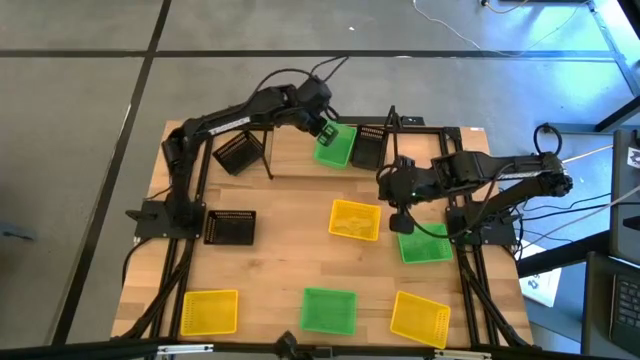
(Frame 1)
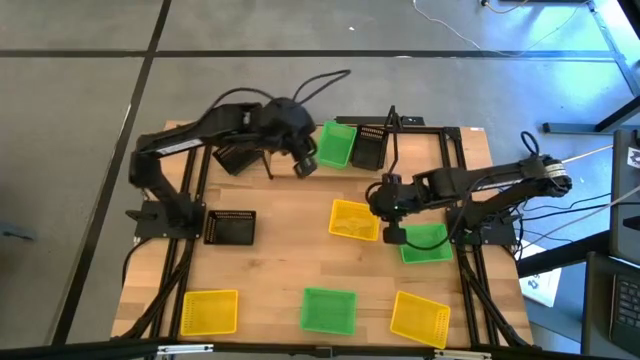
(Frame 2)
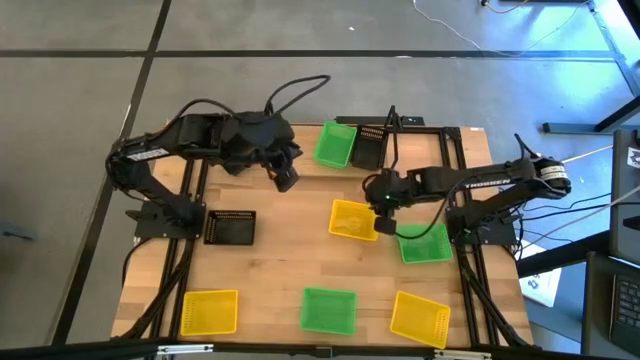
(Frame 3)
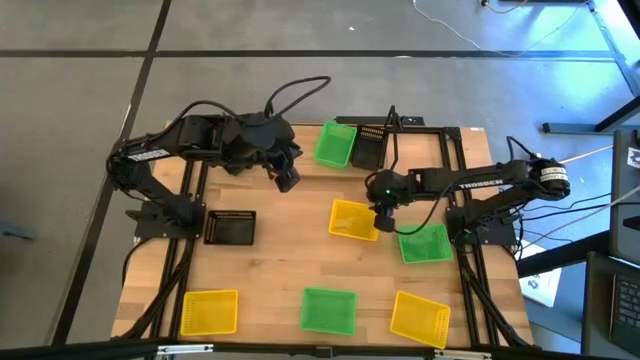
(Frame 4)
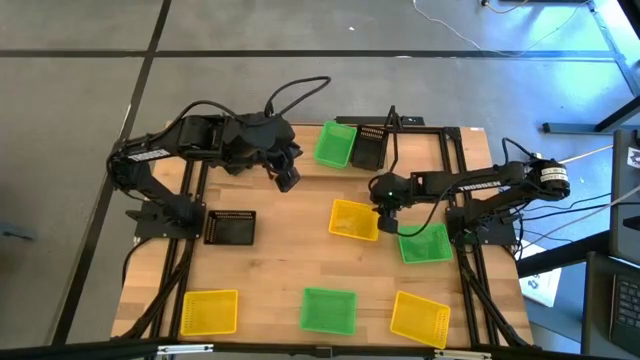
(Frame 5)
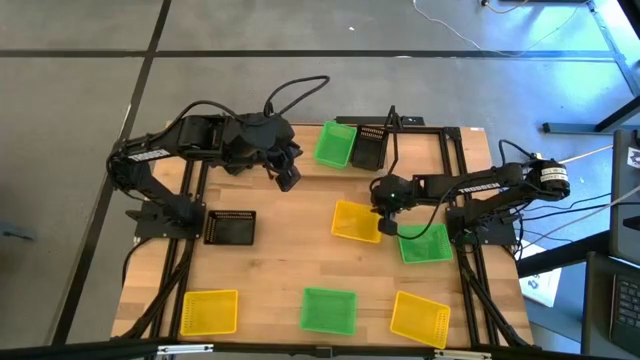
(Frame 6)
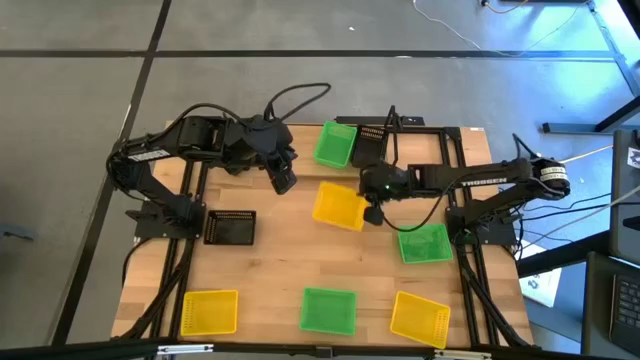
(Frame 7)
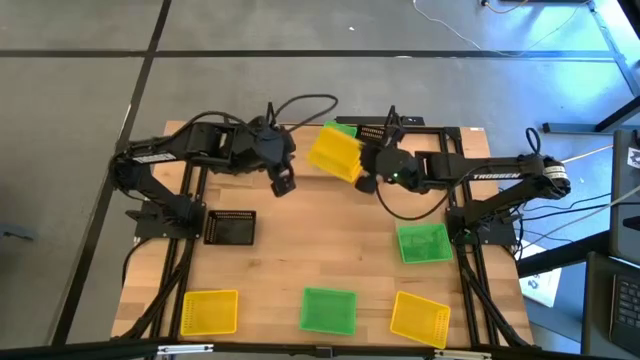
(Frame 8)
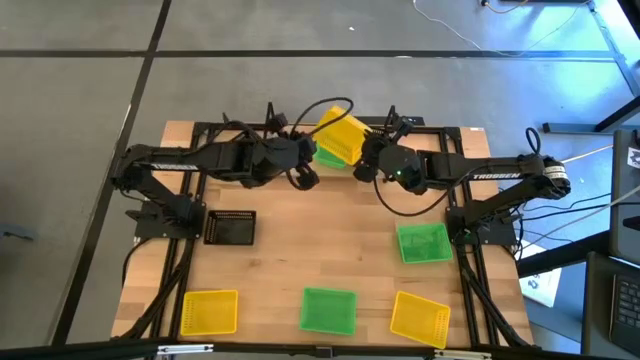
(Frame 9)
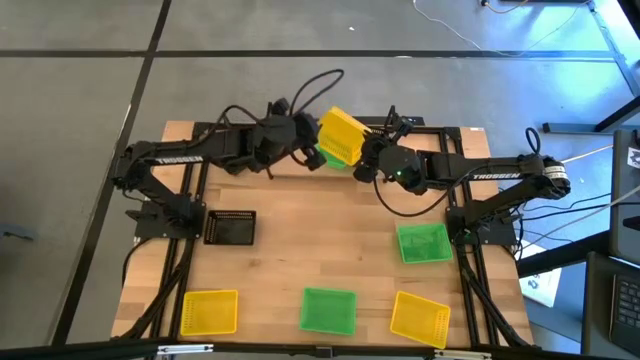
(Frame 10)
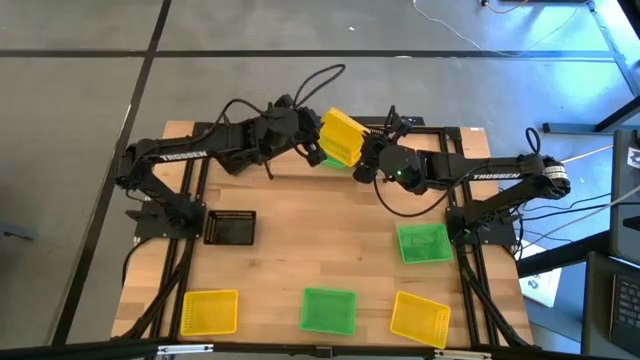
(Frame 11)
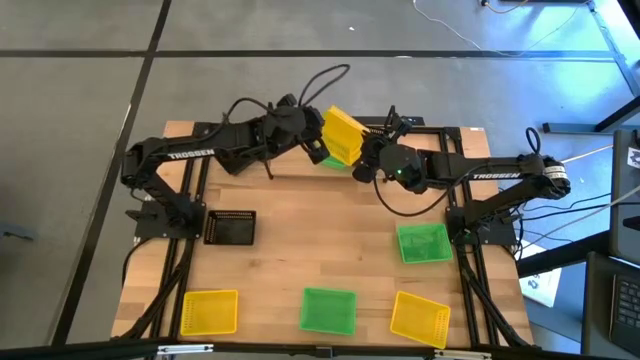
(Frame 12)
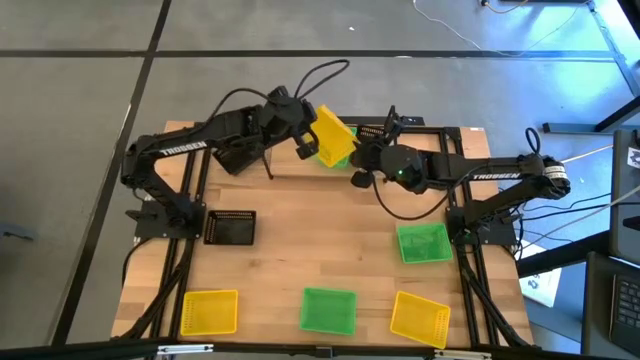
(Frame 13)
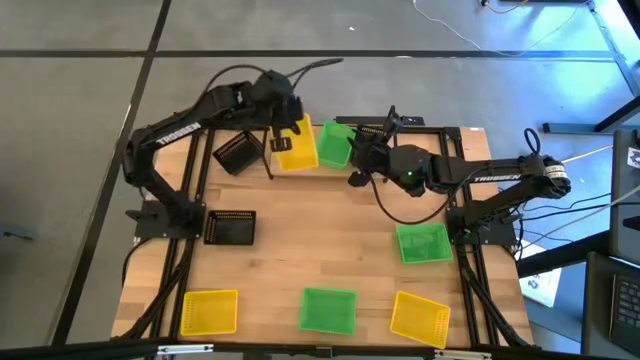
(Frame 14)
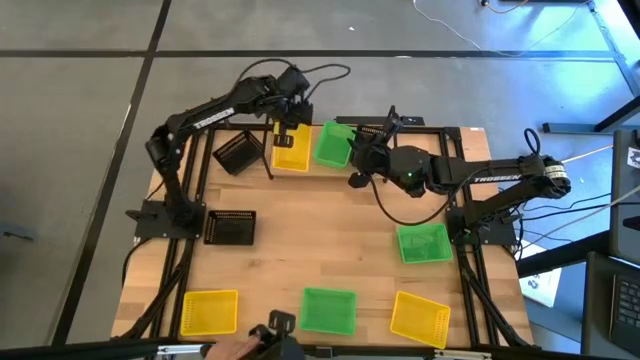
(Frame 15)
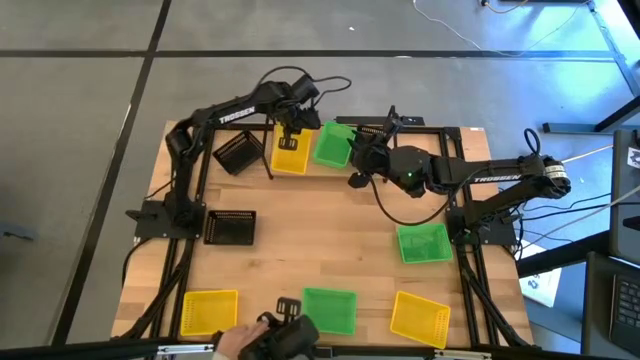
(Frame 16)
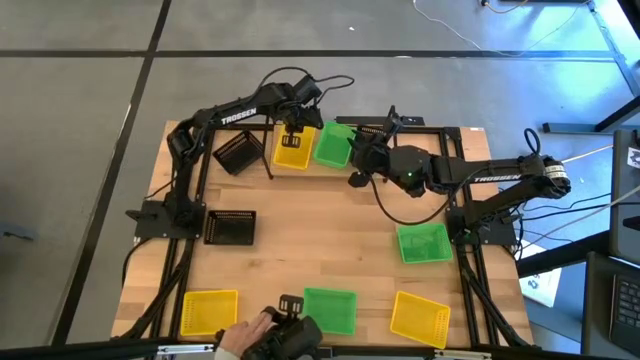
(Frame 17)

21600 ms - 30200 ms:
Task: Stack baskets on shelf by color
Put the top yellow bin on the shelf

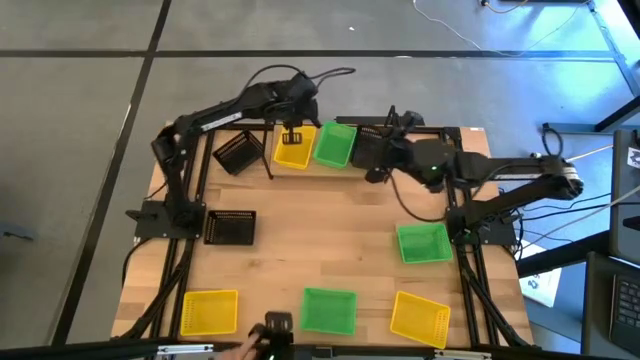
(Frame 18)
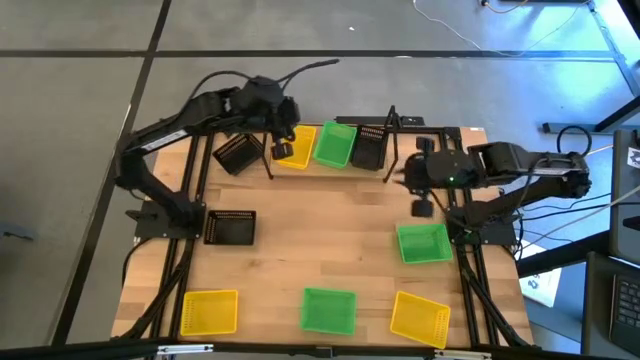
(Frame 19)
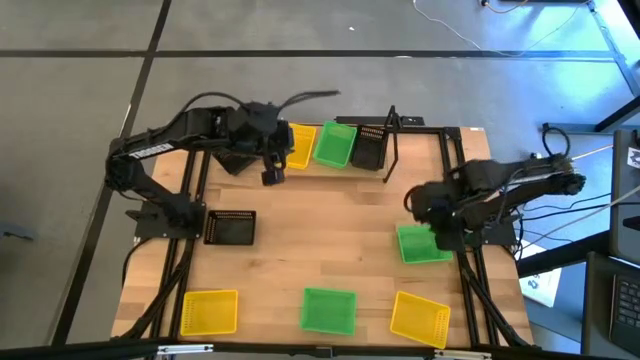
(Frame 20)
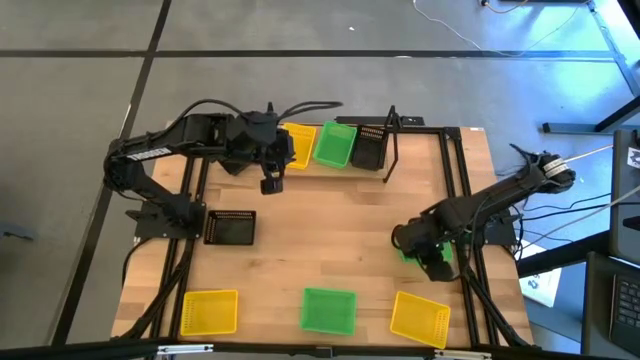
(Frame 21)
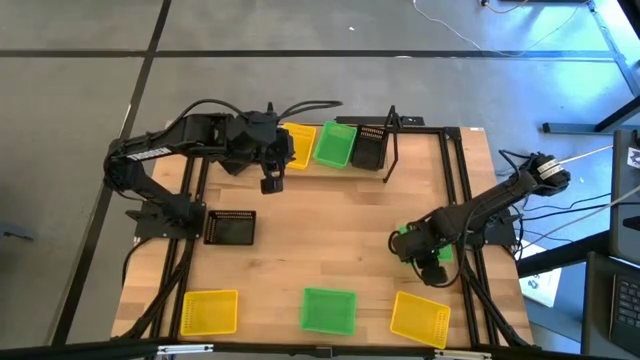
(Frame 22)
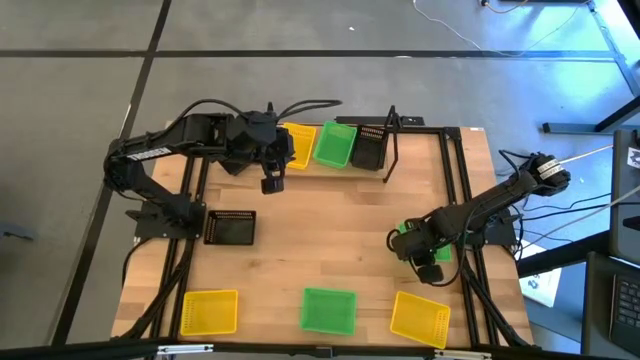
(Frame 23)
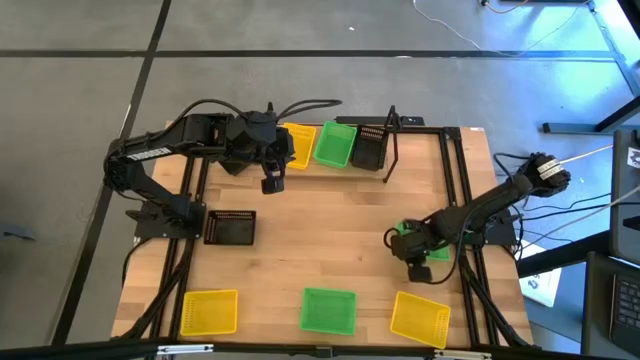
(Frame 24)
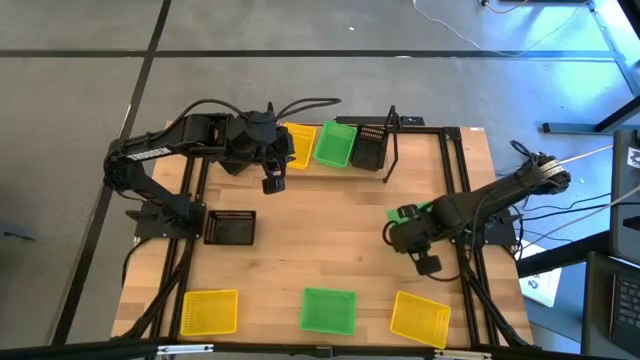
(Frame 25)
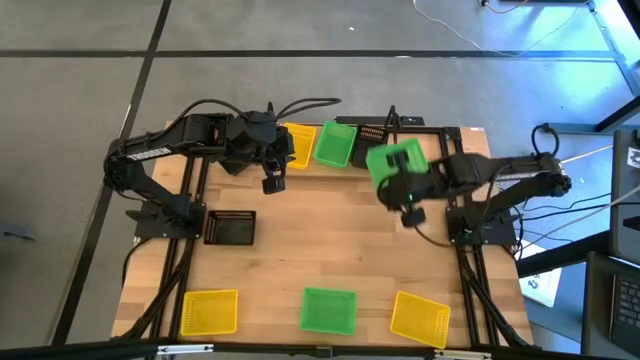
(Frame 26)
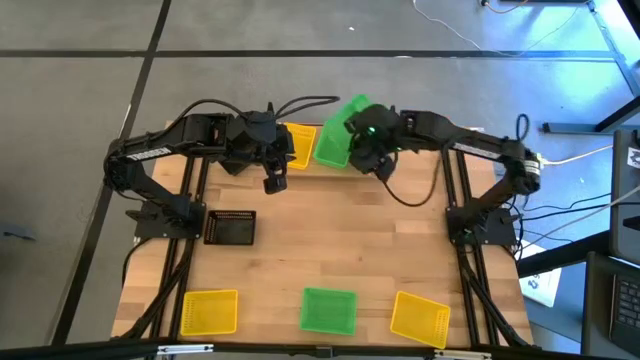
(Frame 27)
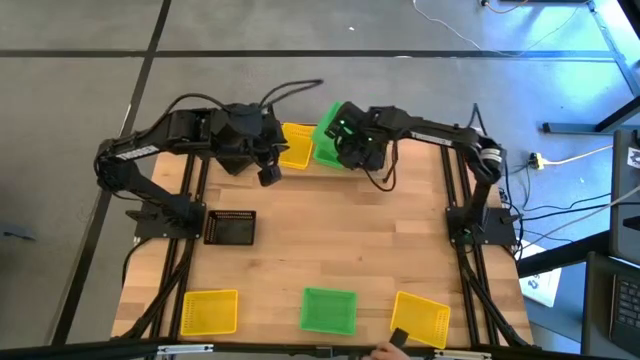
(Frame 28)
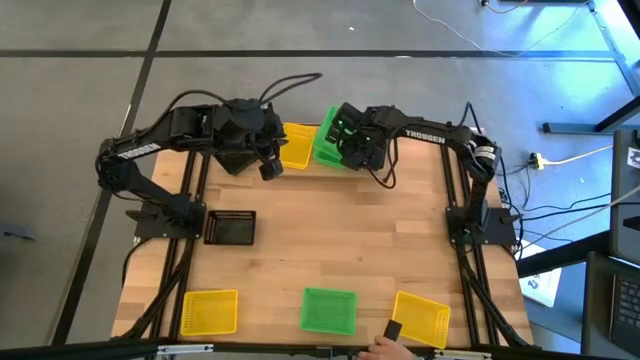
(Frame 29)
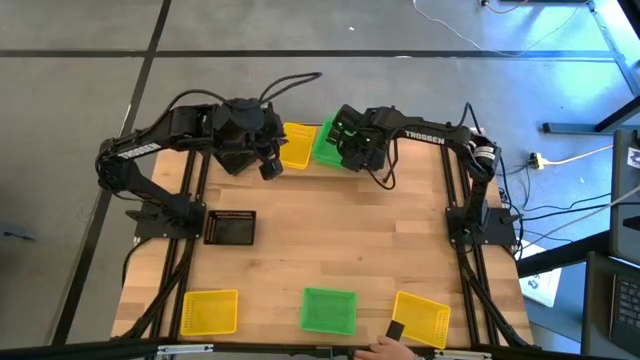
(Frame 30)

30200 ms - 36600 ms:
Stack the top green bin on top of the green bin on the shelf

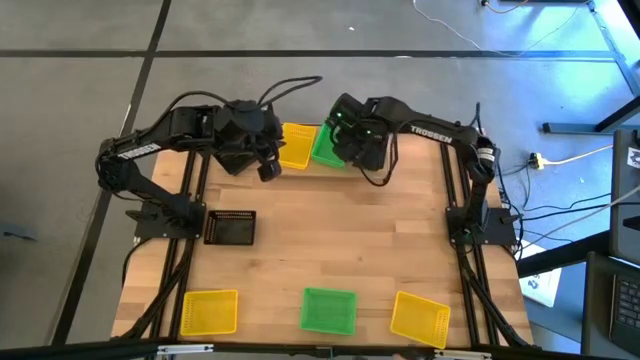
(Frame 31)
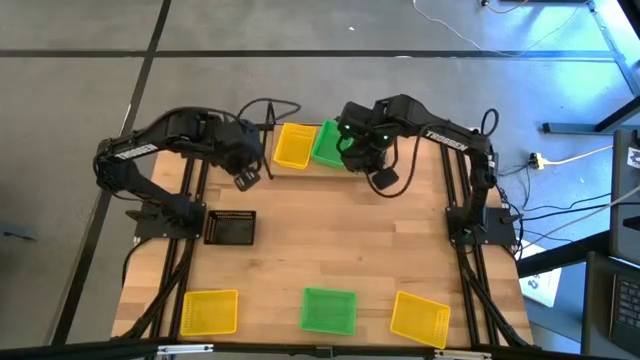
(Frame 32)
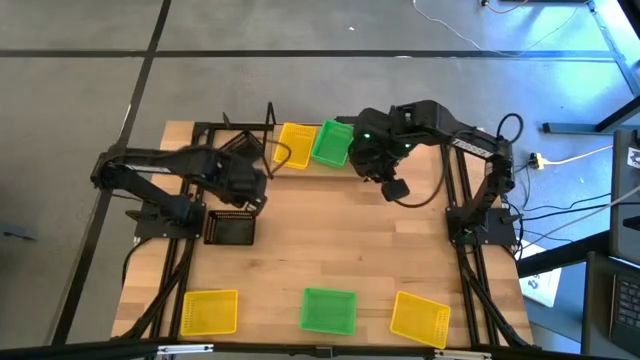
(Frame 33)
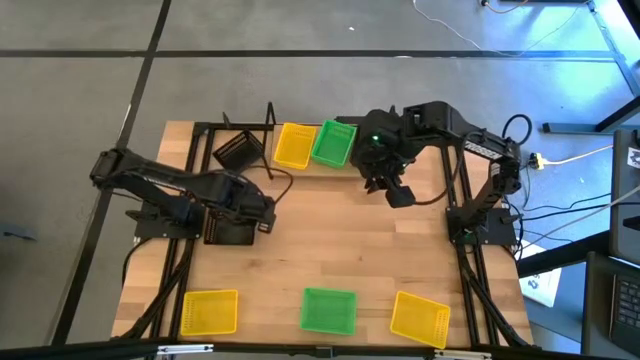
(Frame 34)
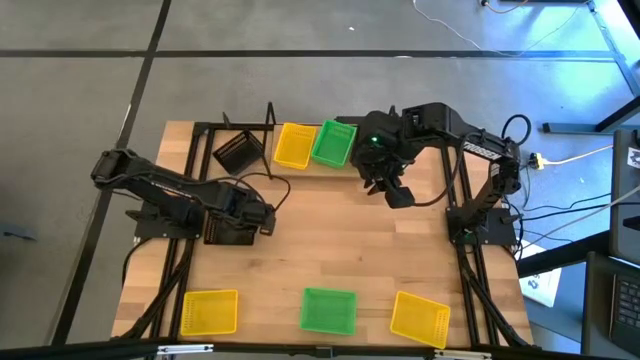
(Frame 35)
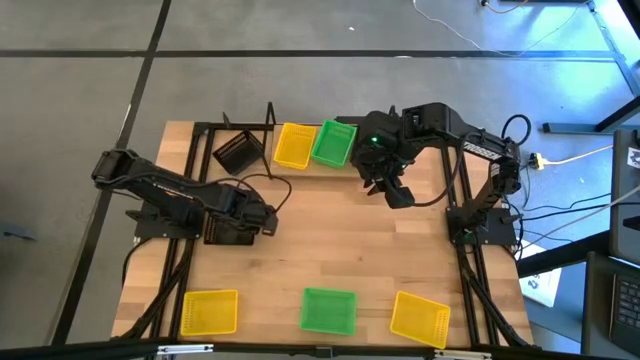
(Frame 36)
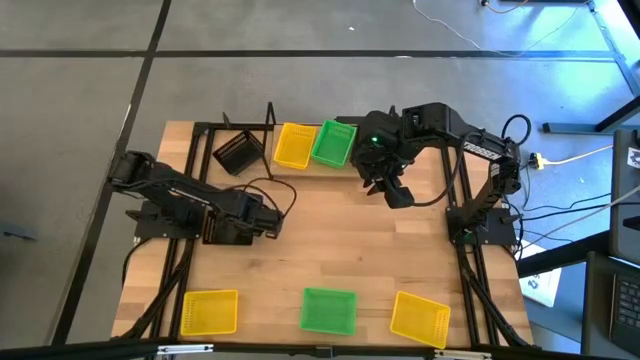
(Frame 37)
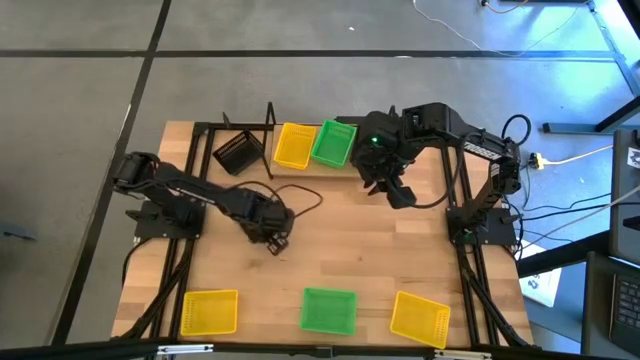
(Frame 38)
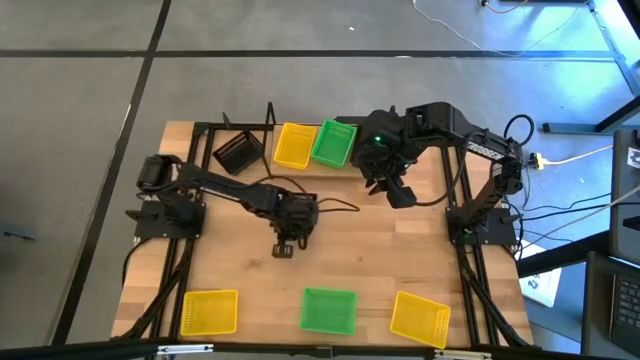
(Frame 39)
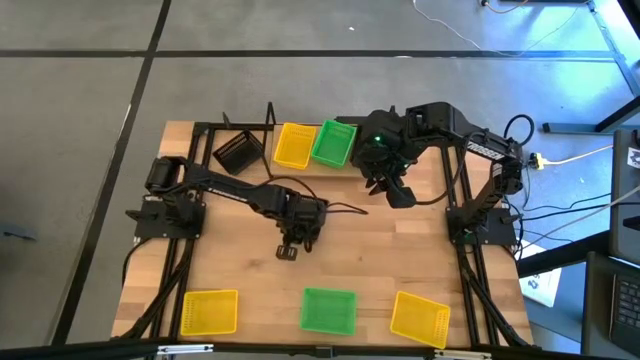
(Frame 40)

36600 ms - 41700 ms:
Move the bottom black bin on the middle of the table
